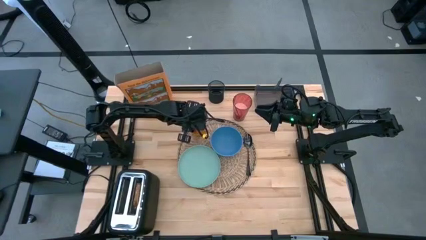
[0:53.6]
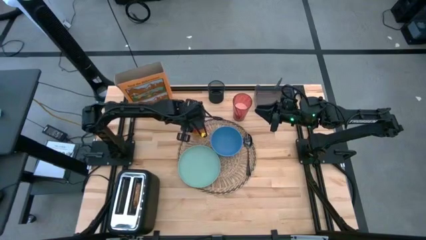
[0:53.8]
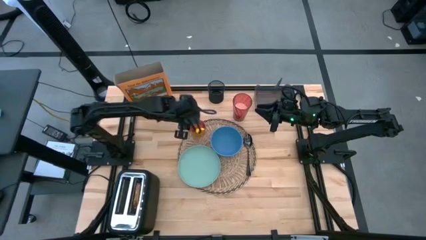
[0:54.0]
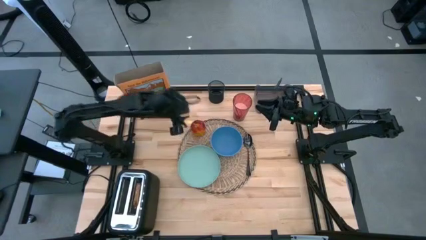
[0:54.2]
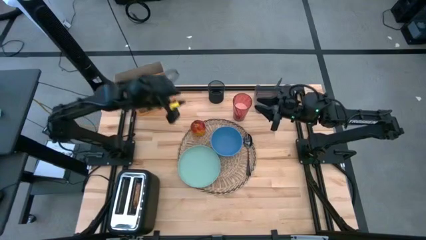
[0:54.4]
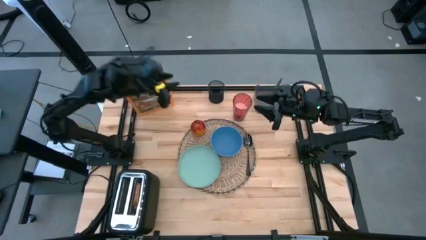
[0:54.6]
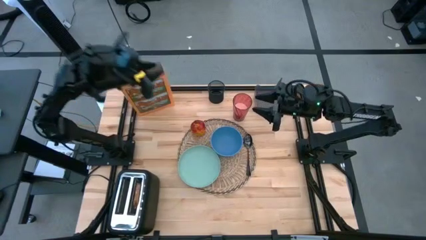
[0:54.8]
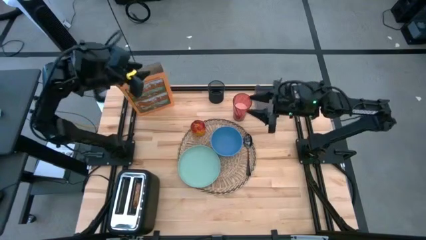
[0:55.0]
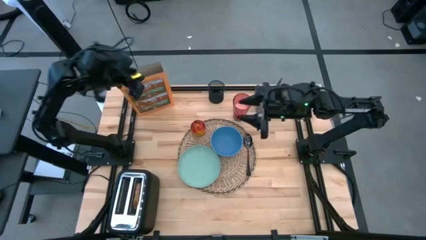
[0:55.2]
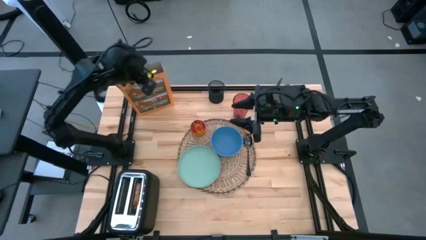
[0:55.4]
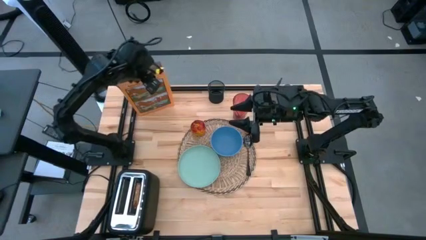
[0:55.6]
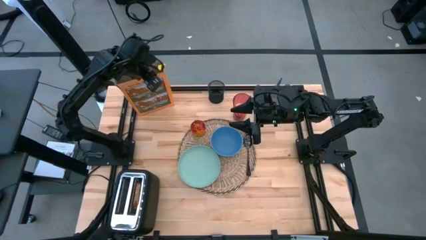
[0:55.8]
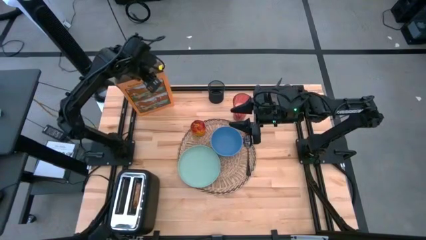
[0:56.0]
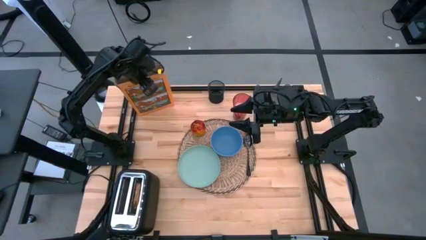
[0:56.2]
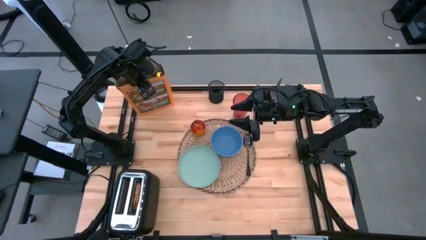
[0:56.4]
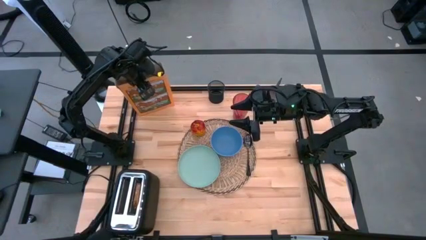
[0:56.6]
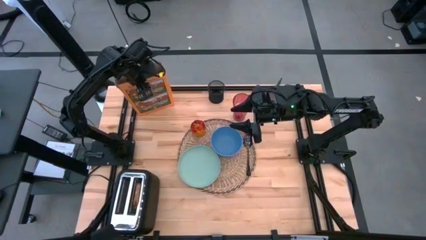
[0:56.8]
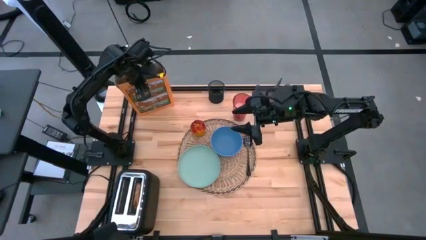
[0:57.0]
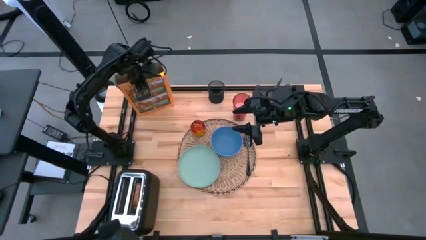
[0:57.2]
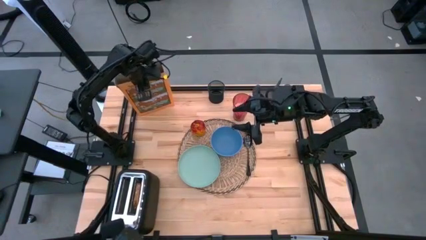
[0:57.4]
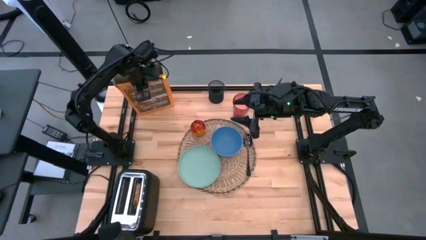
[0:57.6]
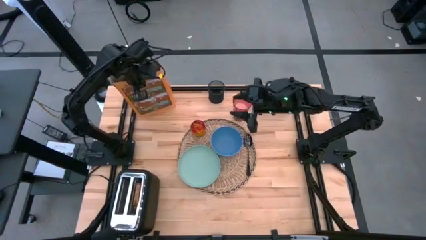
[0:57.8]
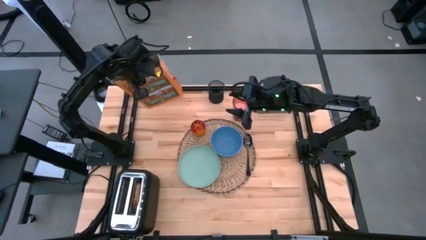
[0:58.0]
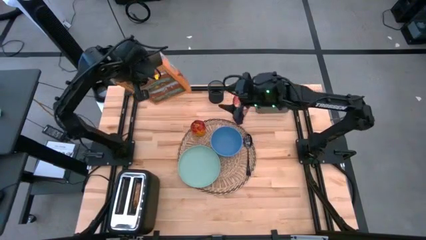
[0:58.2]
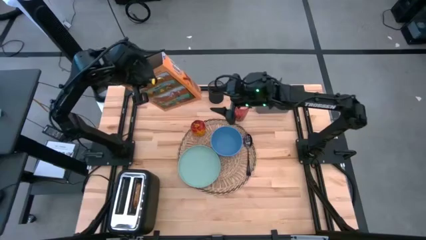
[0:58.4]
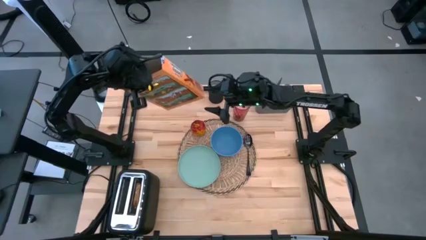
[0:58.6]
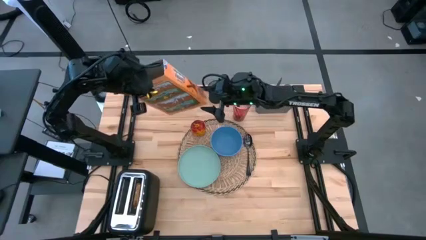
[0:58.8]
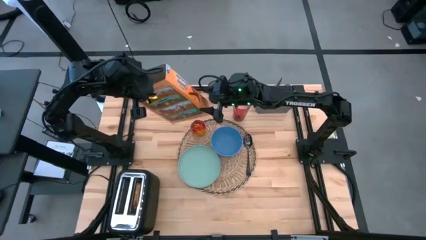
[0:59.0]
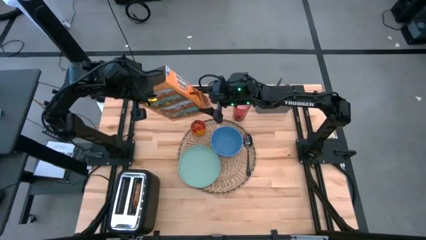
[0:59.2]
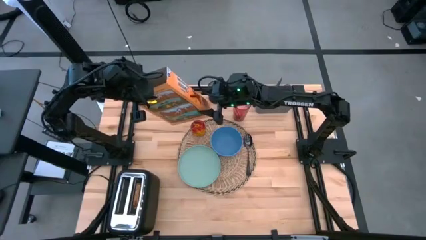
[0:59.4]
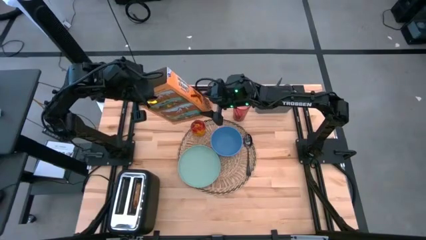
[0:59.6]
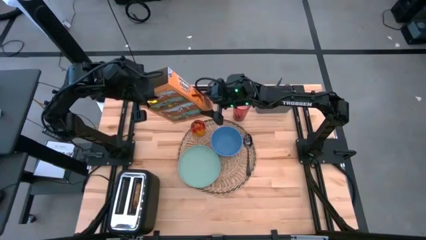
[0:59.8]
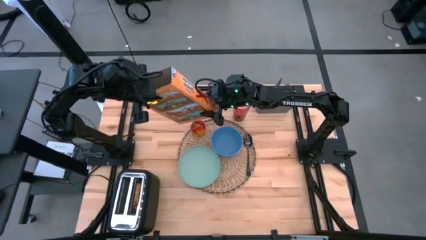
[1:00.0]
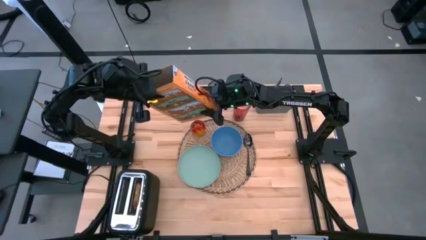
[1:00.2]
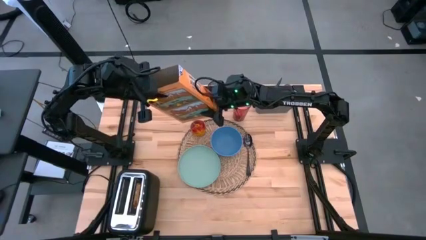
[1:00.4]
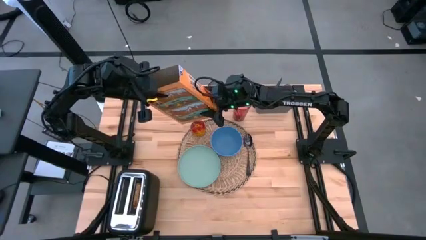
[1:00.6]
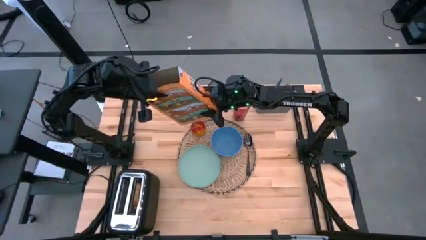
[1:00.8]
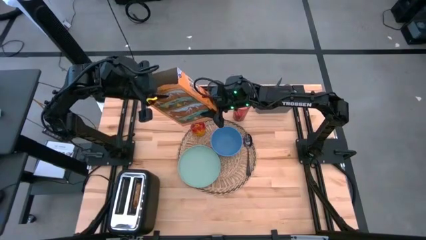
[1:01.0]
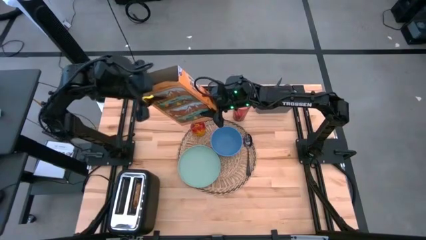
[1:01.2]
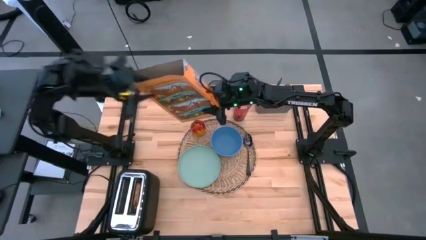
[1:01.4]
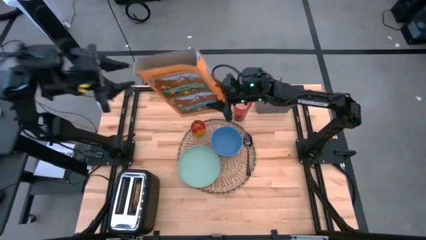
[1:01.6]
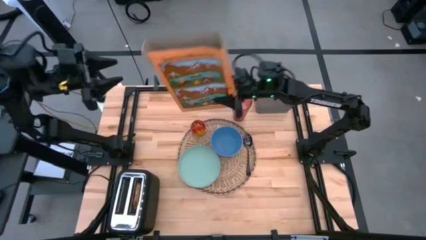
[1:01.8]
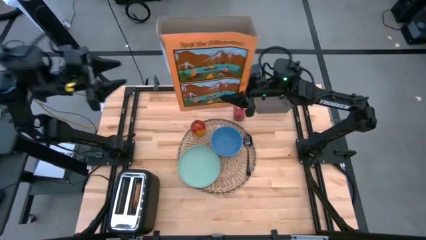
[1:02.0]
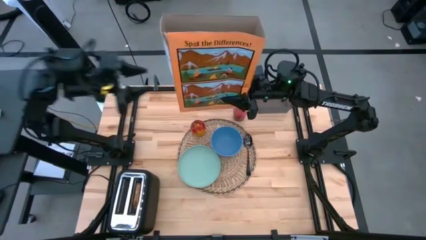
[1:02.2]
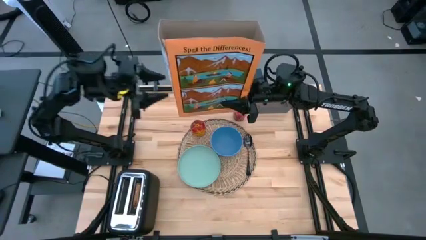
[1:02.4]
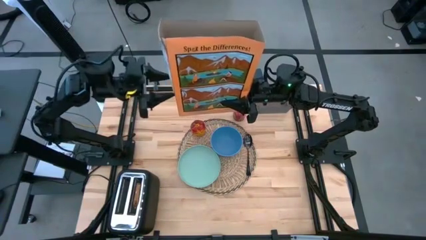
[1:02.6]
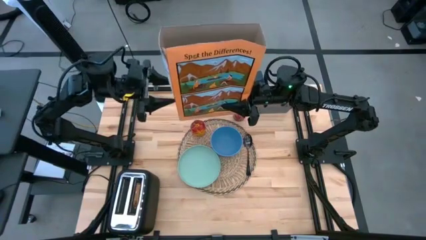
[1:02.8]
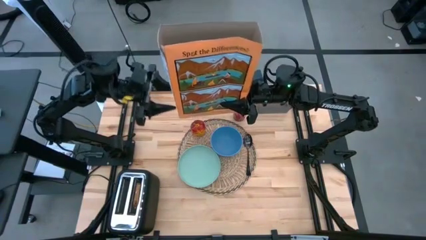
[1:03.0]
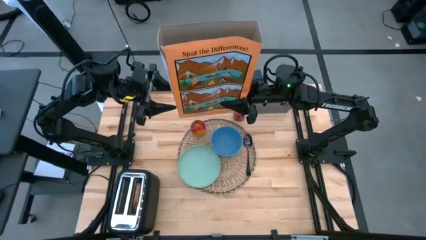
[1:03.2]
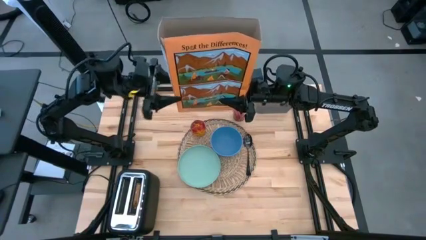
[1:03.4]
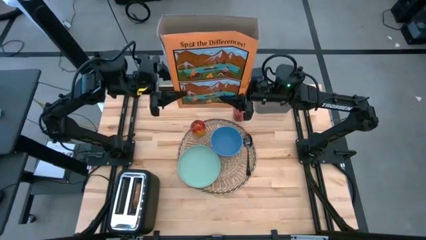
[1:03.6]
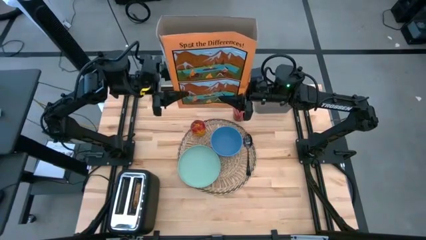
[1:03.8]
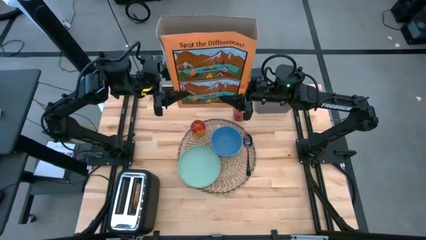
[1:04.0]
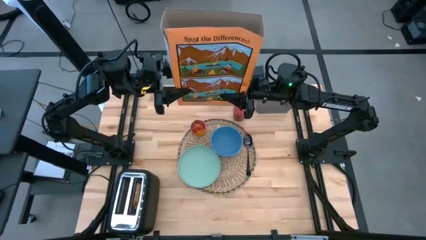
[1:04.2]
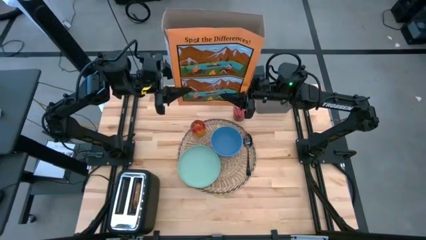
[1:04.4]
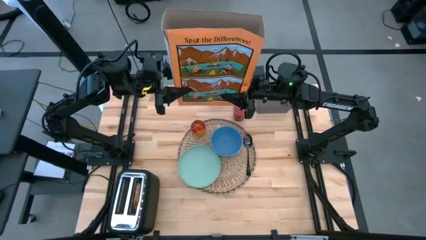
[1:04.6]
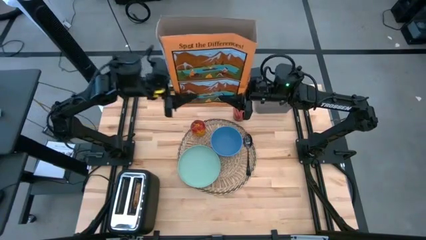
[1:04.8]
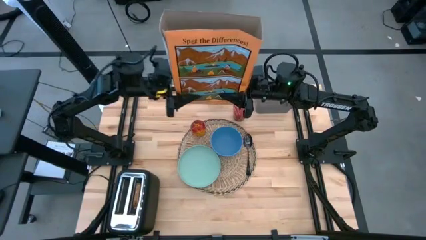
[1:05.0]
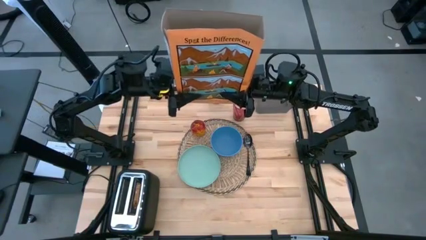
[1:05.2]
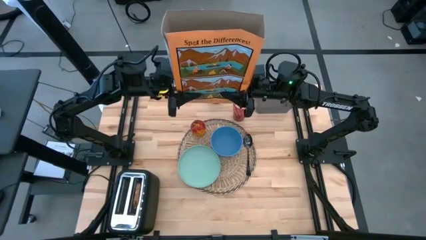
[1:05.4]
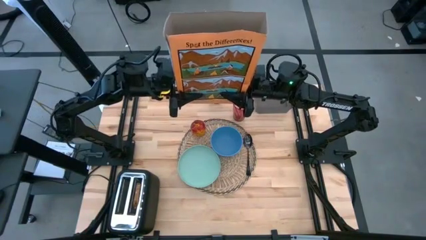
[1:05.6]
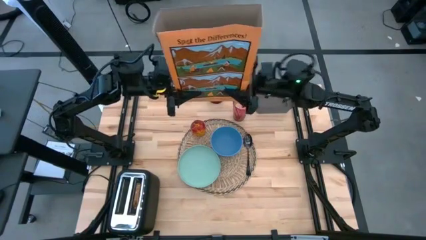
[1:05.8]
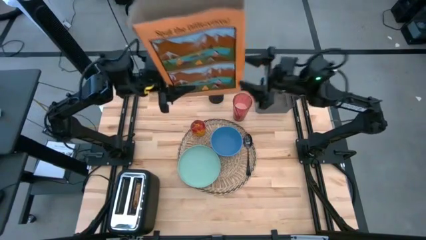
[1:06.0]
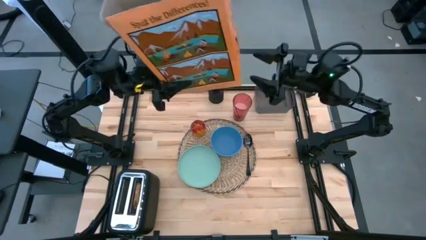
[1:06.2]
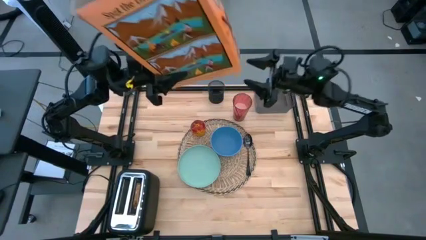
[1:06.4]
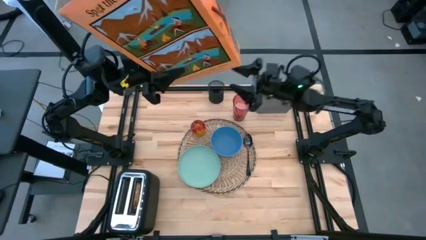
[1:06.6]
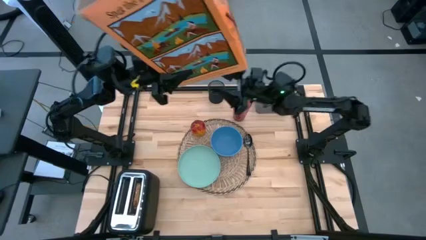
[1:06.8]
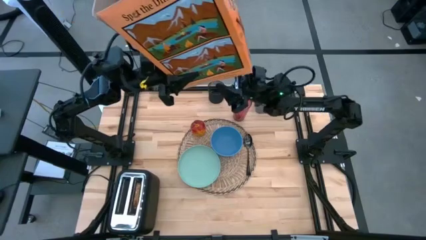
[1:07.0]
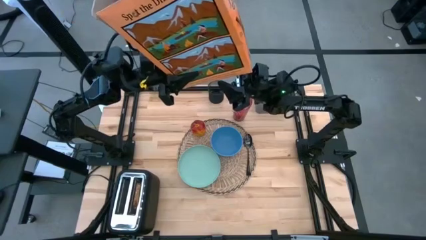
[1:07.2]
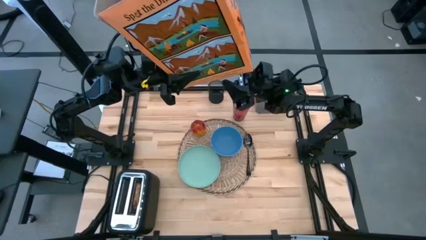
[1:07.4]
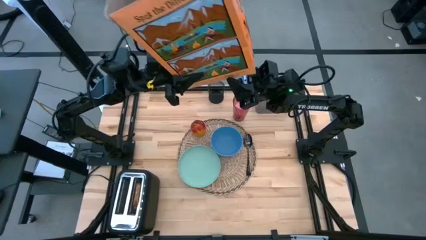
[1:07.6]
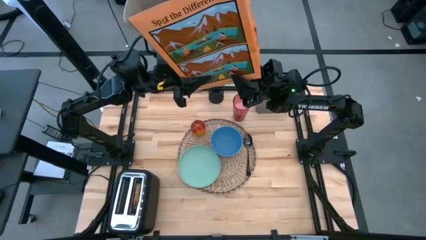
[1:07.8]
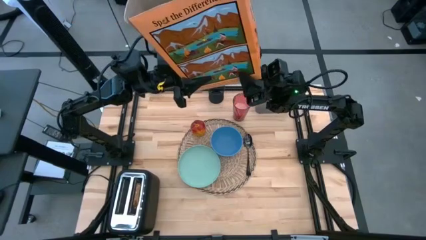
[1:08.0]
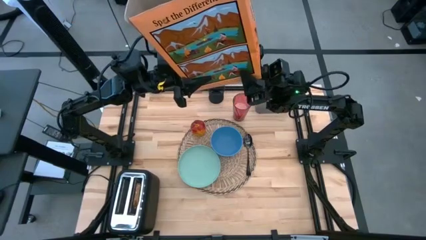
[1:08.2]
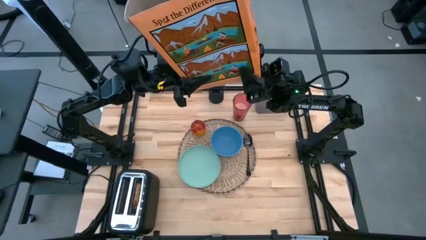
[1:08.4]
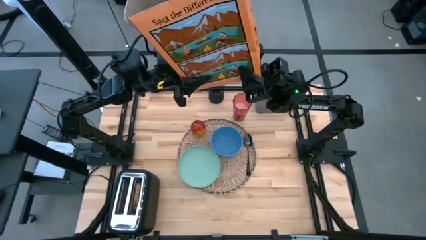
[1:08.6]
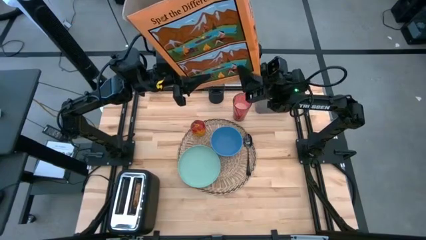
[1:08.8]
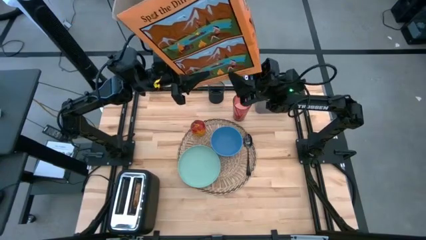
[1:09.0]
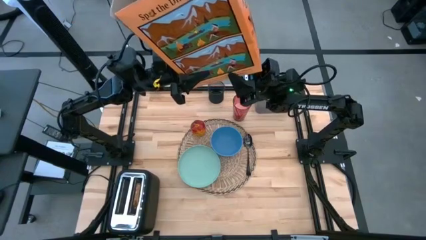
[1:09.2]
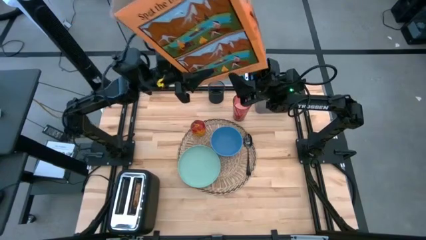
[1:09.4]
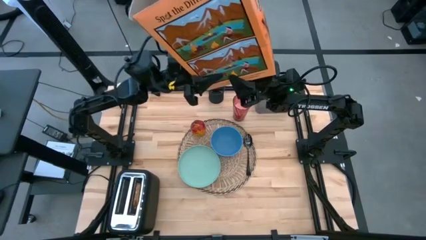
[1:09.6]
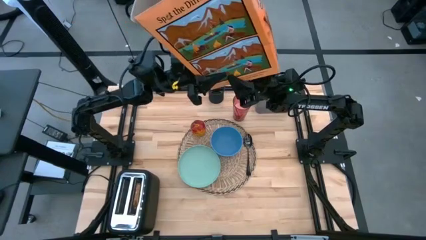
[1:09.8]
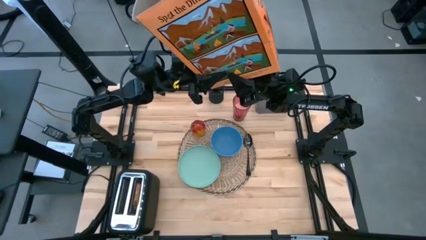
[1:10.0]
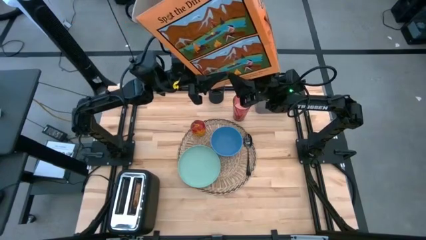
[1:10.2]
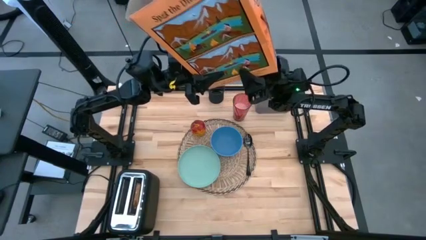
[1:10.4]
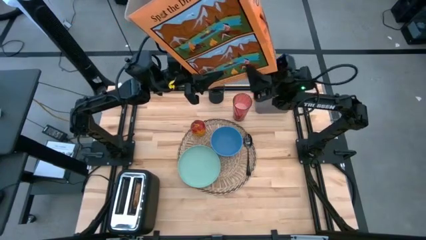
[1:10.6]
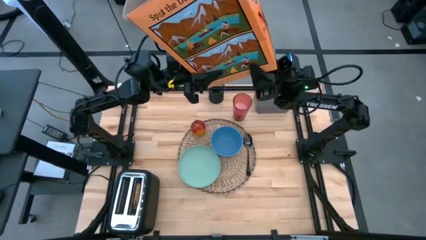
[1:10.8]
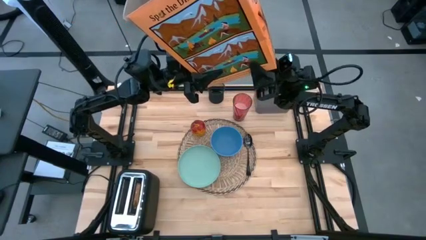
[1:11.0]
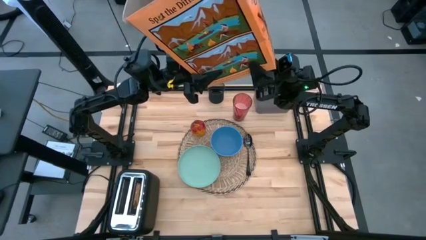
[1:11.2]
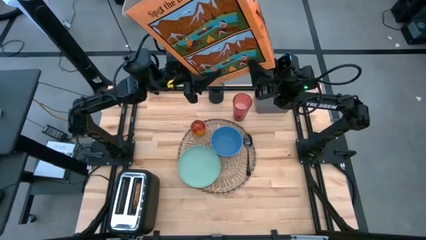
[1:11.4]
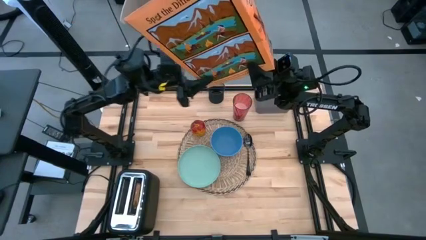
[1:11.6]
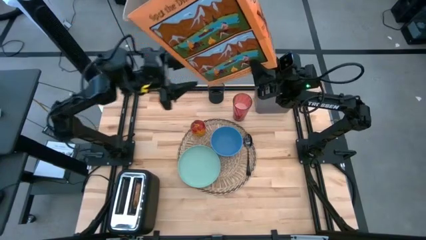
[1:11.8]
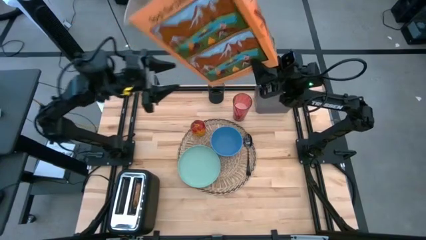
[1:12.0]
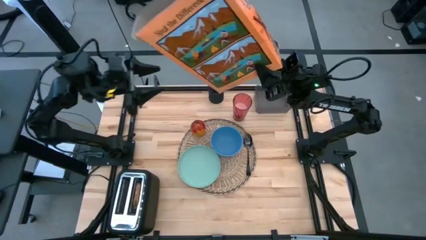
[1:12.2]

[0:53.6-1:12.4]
Task: Arrange a breakfast setting
Pour the cereal from the orange cereal box into the blue bowl
